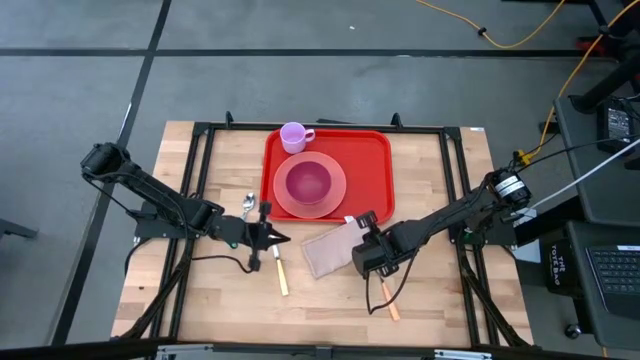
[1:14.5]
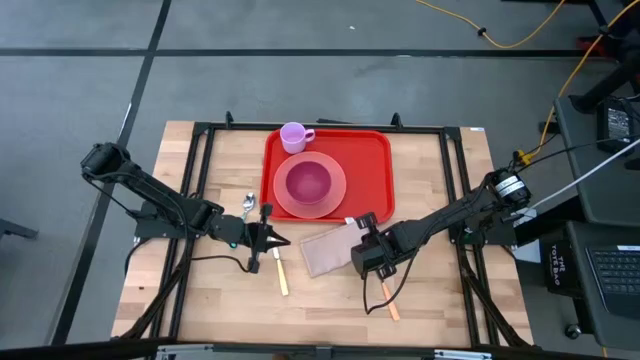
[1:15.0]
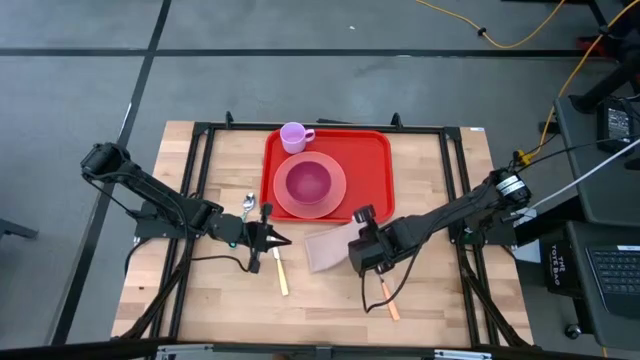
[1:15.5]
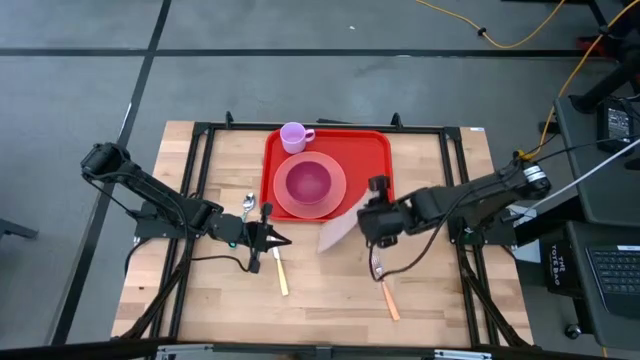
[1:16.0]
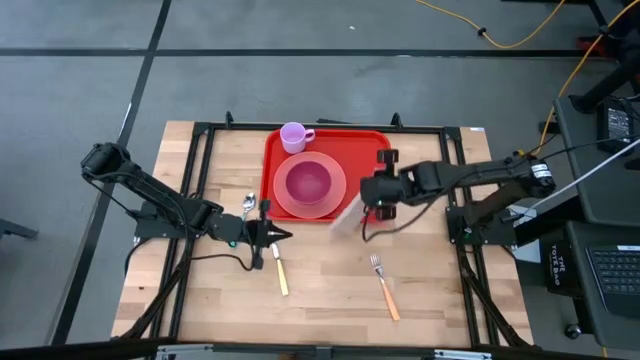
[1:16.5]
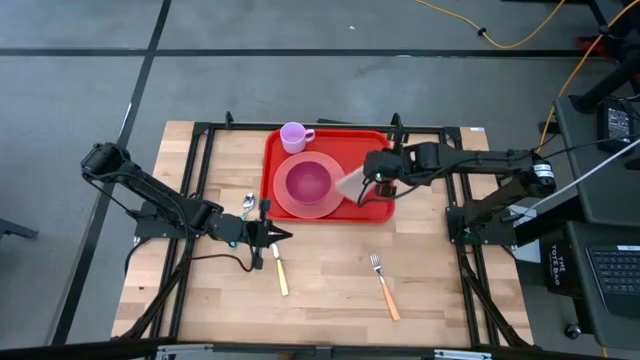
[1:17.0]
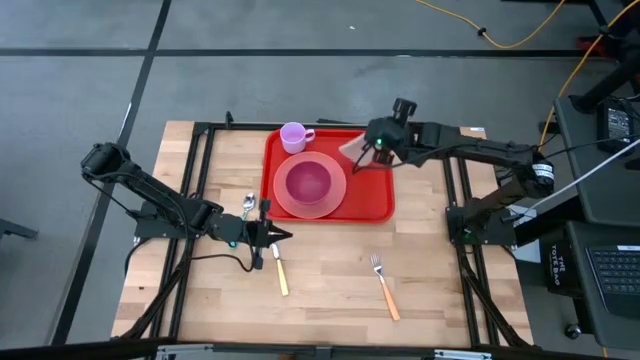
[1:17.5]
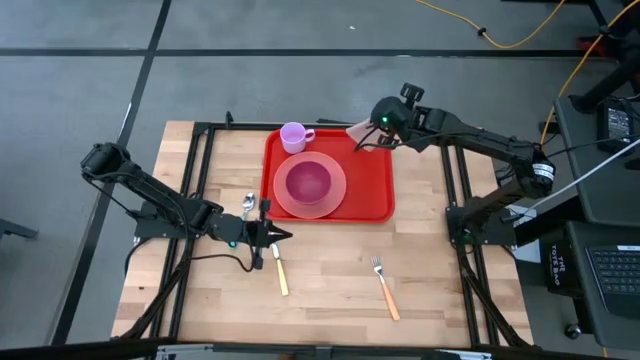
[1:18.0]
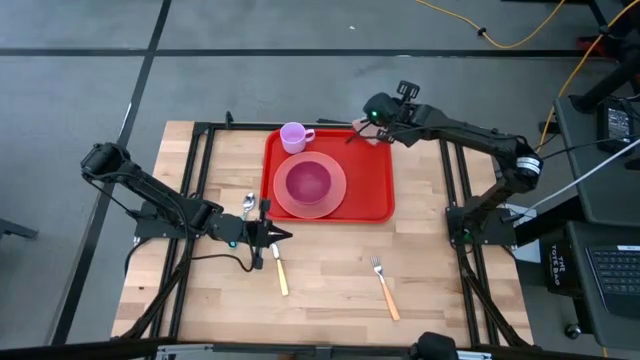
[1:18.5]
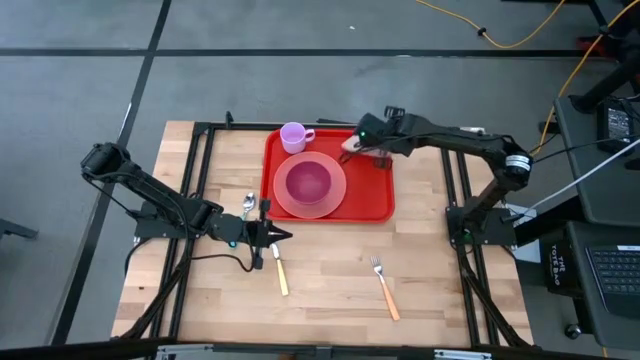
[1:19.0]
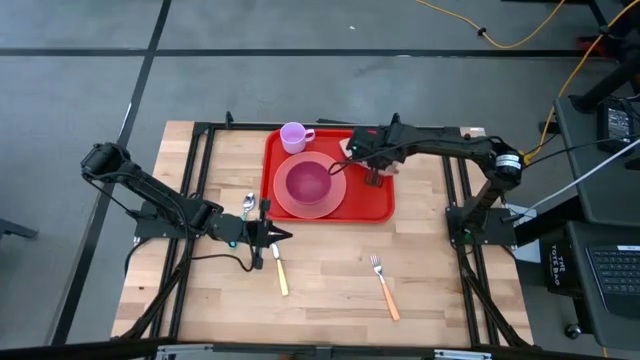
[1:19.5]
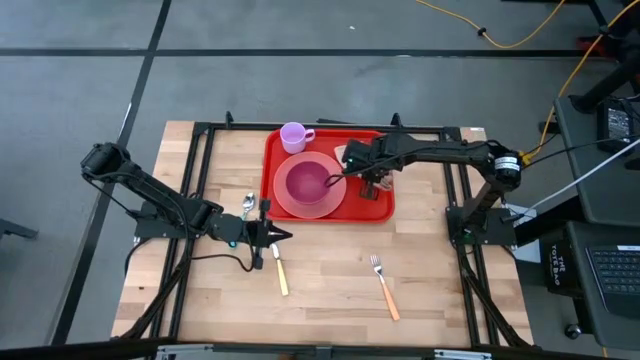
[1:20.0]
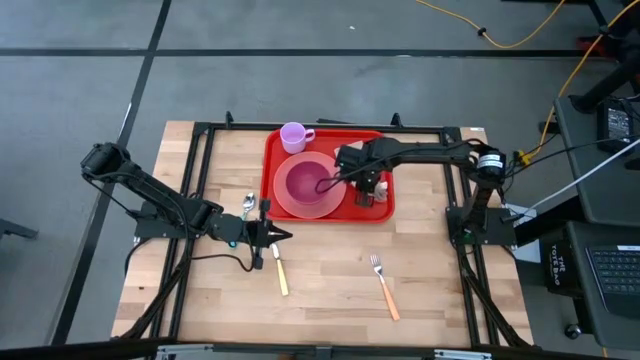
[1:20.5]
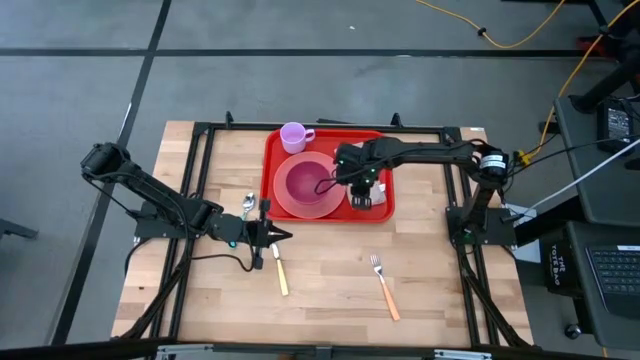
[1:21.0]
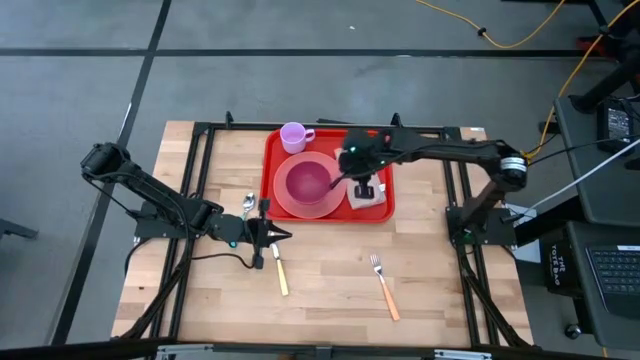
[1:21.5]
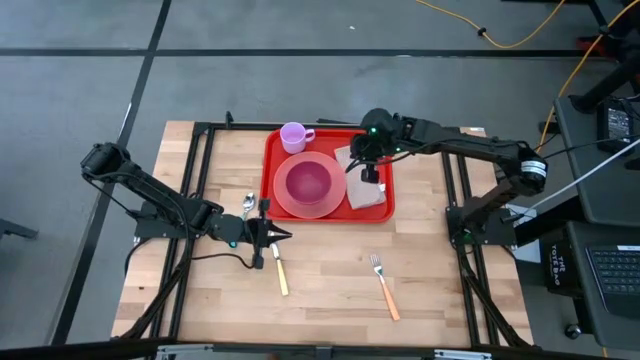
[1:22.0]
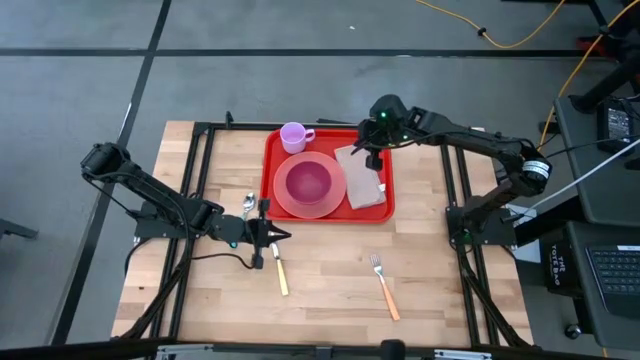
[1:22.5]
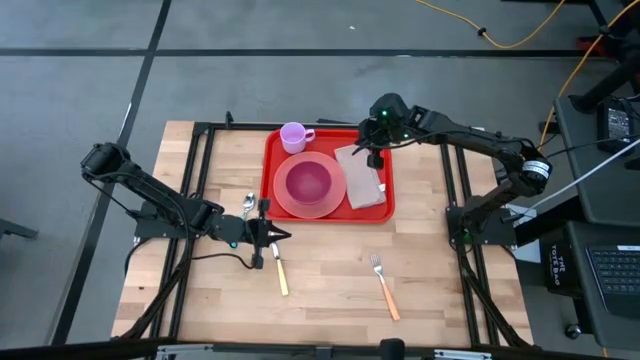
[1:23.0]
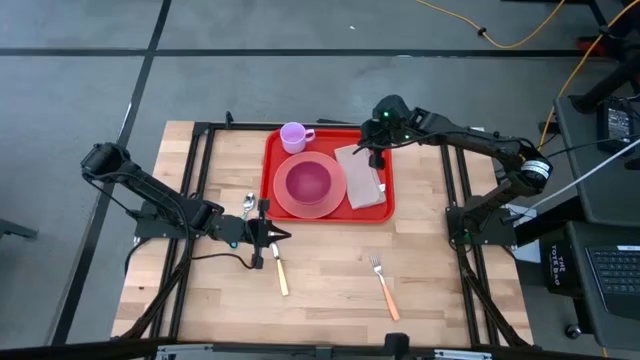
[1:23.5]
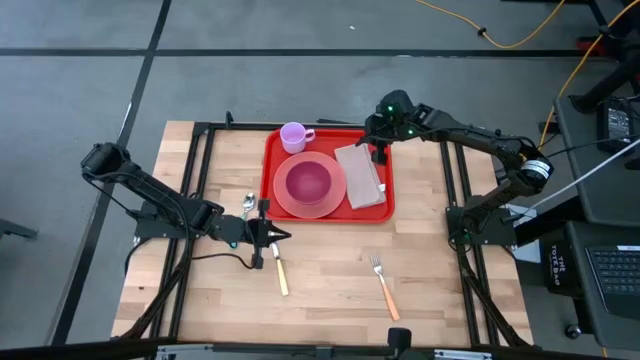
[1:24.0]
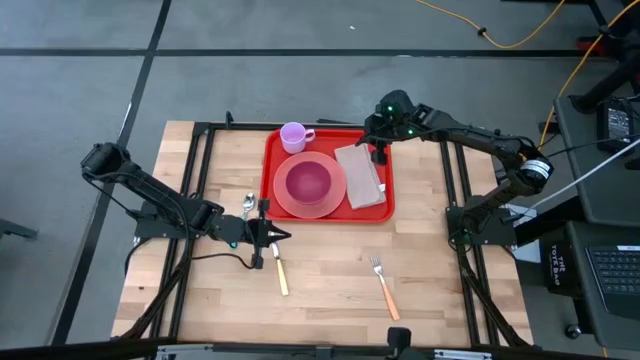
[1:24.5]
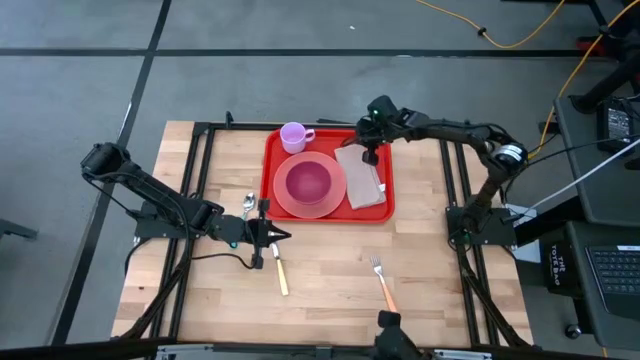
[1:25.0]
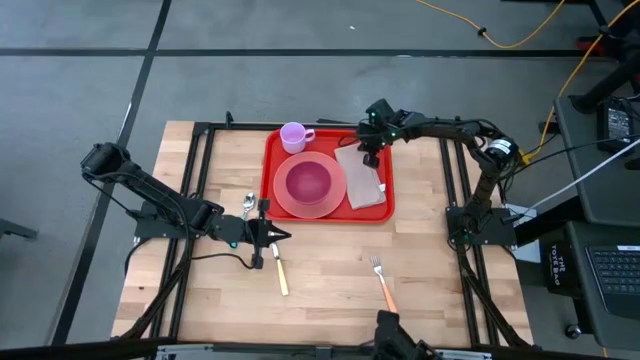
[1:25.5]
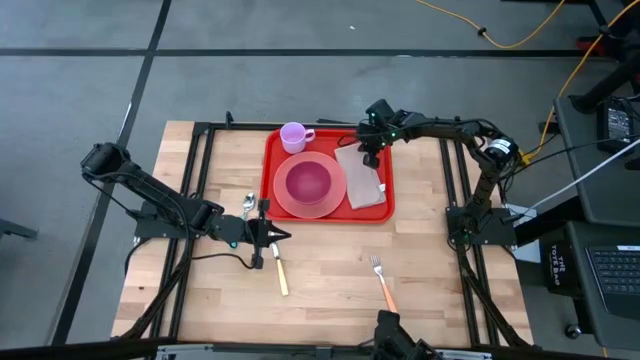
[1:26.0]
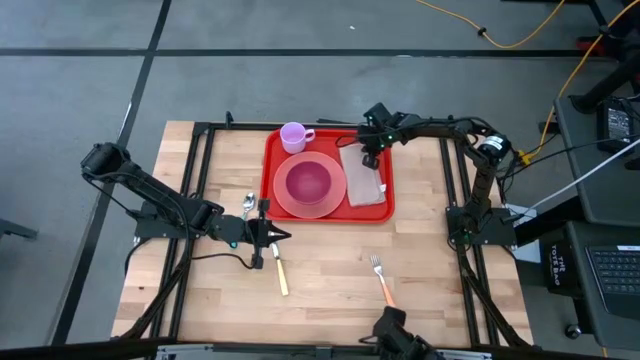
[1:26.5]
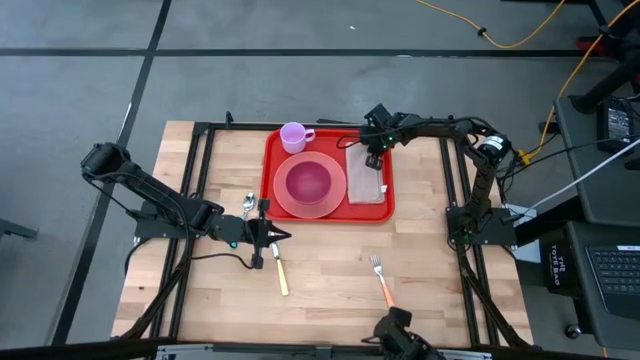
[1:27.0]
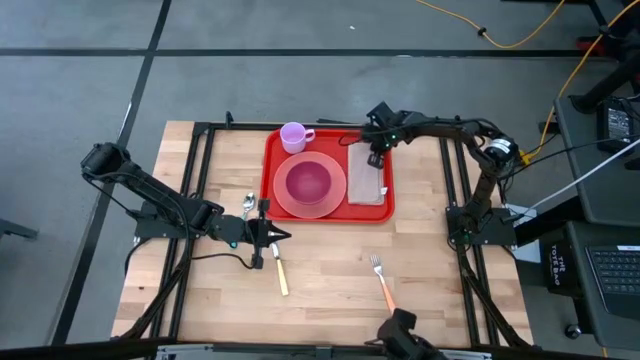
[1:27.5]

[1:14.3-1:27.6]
Task: Set up tray
Put the brown napkin on the red serving tray to the right of the pink plate

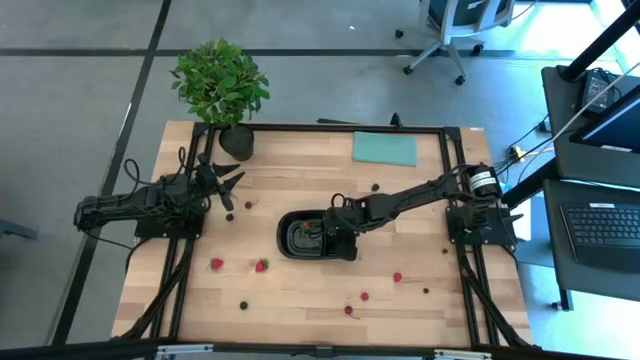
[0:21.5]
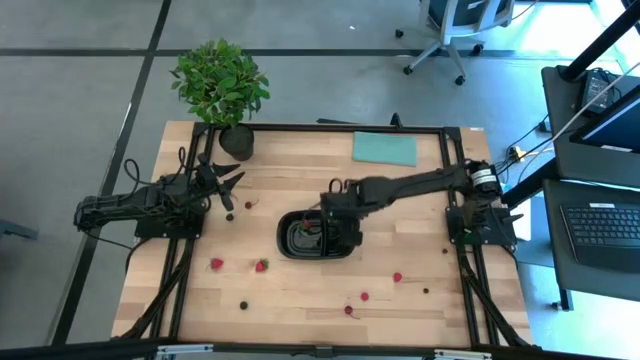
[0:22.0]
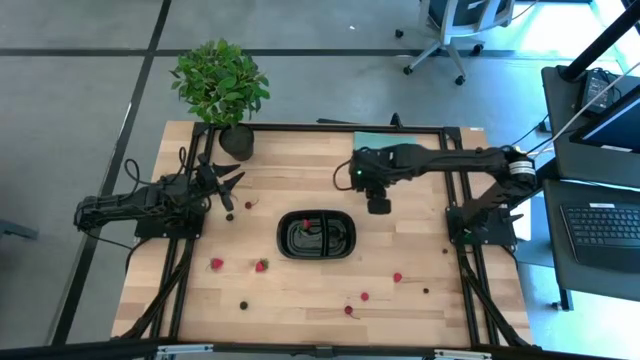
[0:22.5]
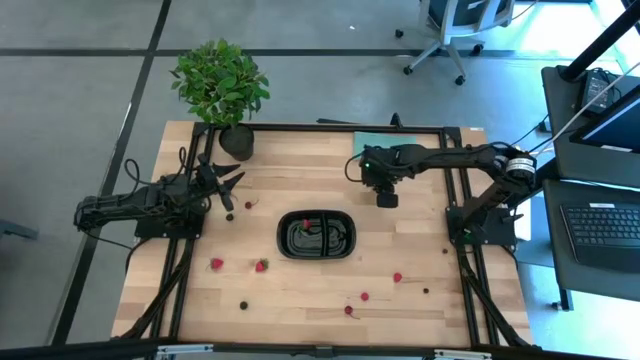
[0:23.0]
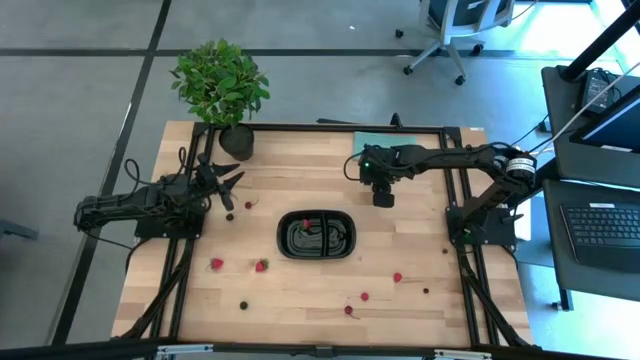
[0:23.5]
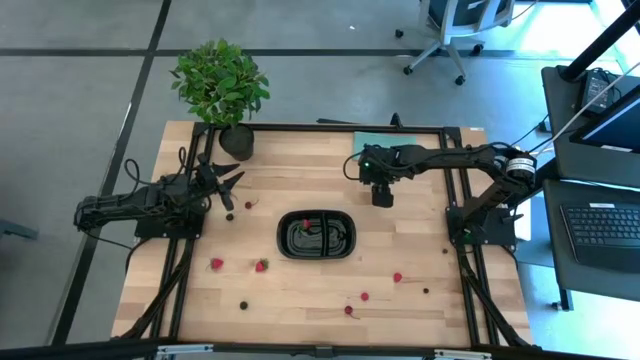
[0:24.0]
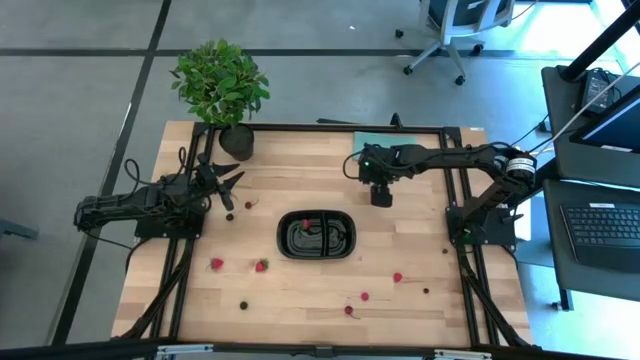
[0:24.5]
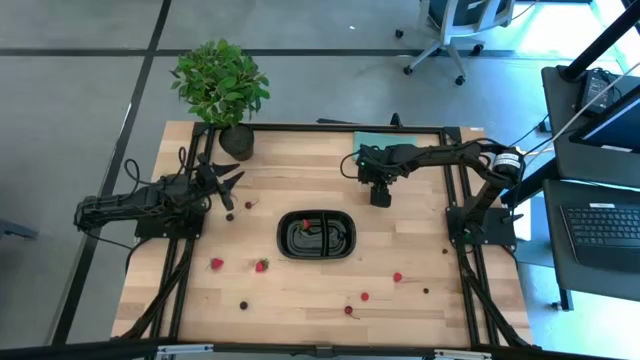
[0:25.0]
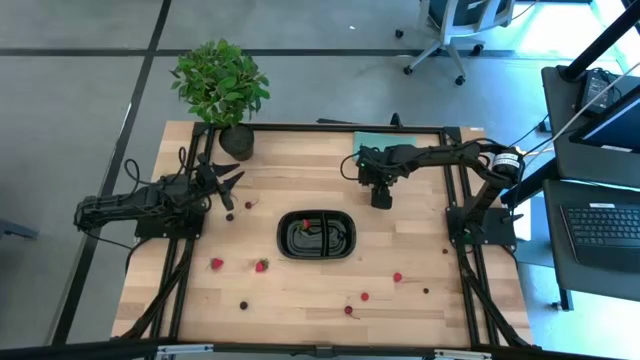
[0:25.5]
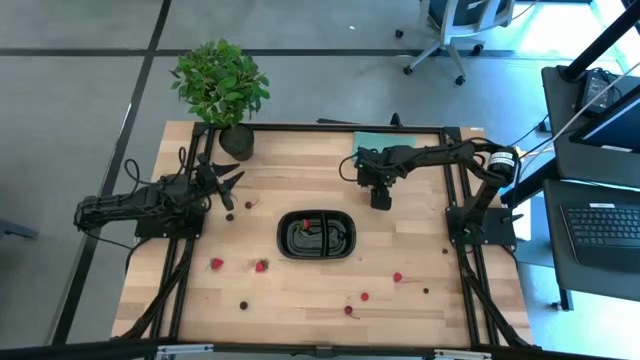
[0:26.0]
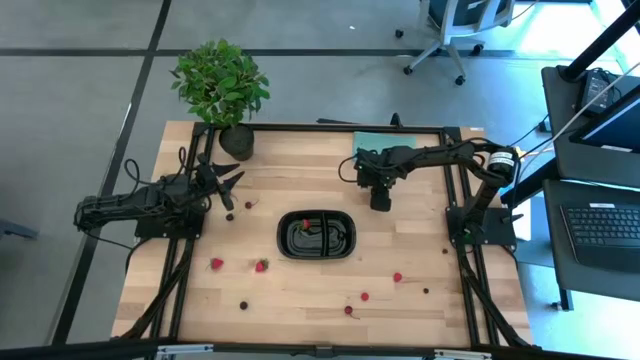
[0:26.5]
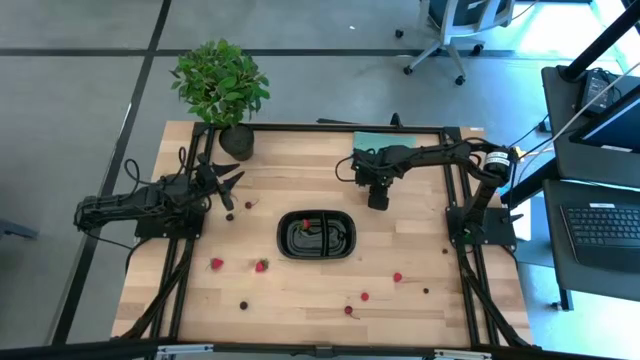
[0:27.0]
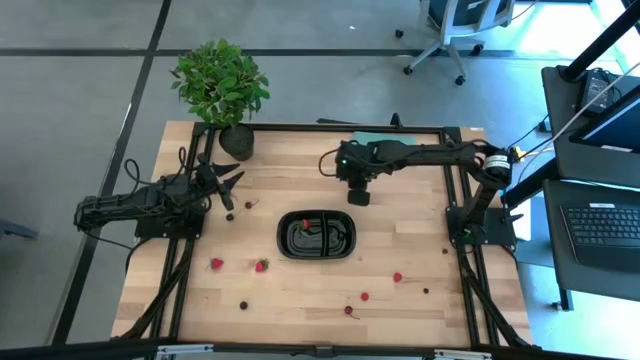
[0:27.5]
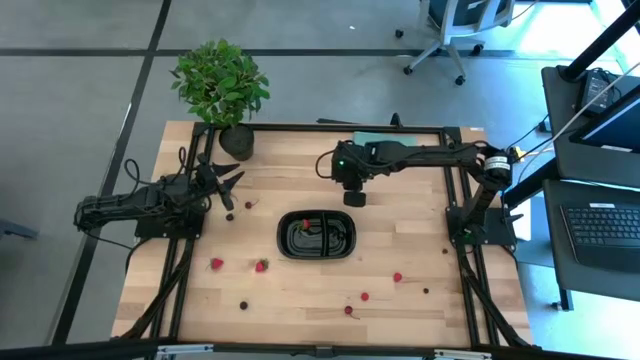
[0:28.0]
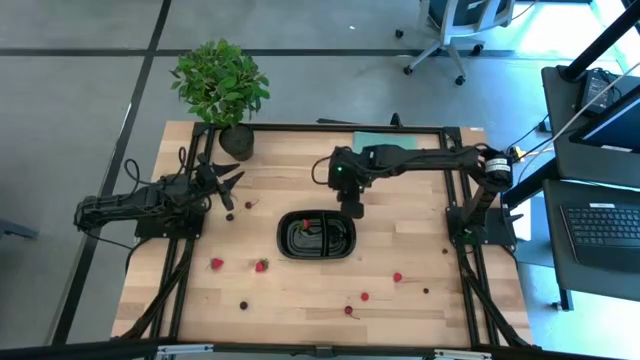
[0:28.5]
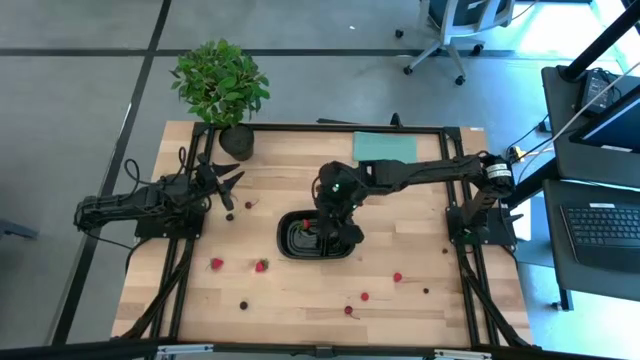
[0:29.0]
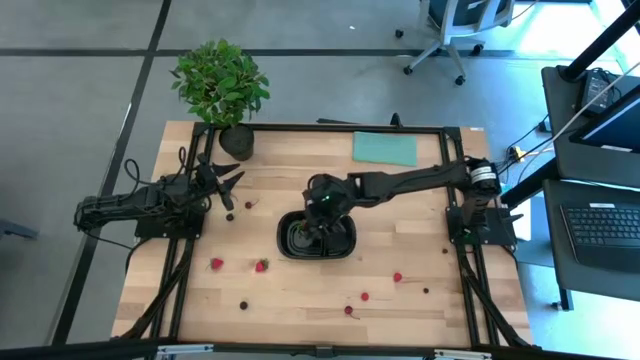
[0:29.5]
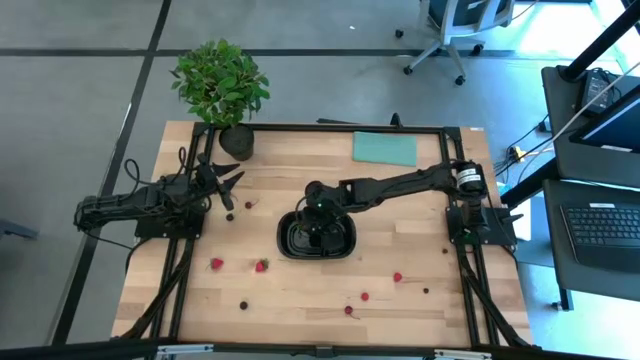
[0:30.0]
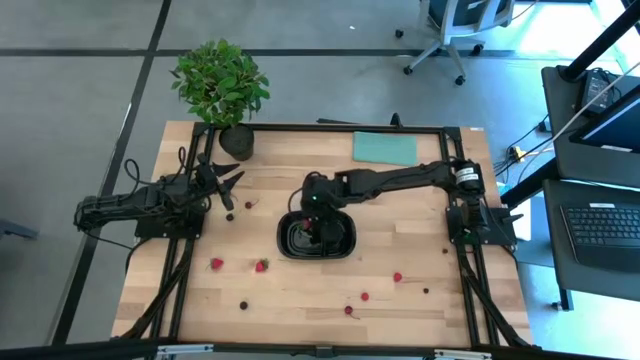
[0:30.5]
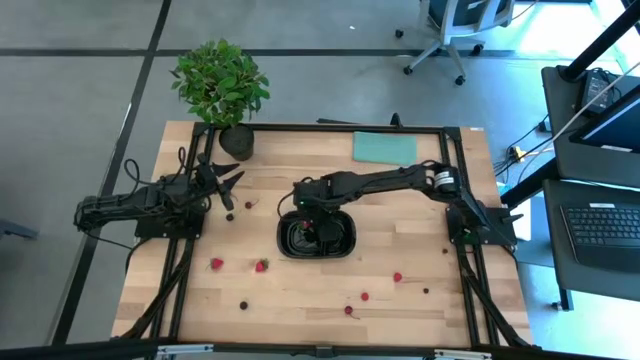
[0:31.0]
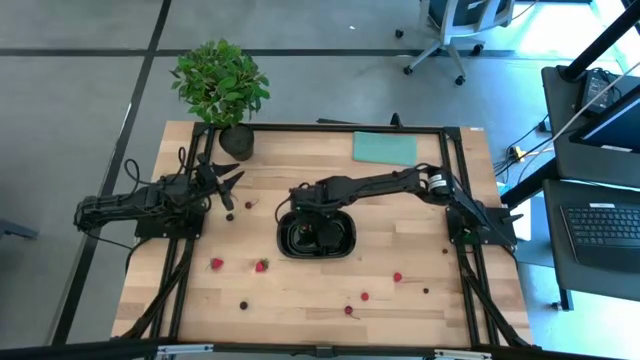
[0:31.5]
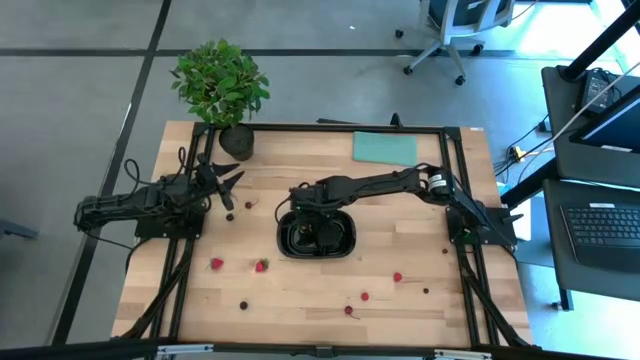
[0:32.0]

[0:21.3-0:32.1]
Task: Pick and placing Produce into tupperware
Put the top blackberry into the left section of the black bin
